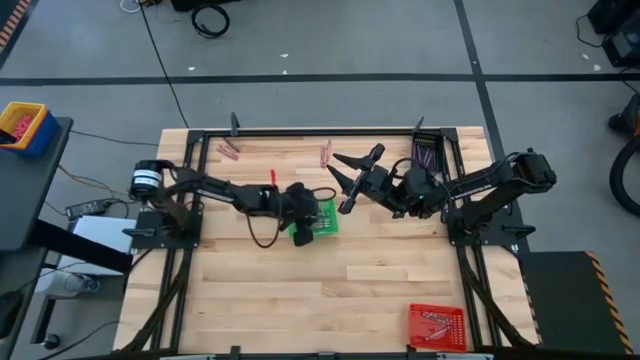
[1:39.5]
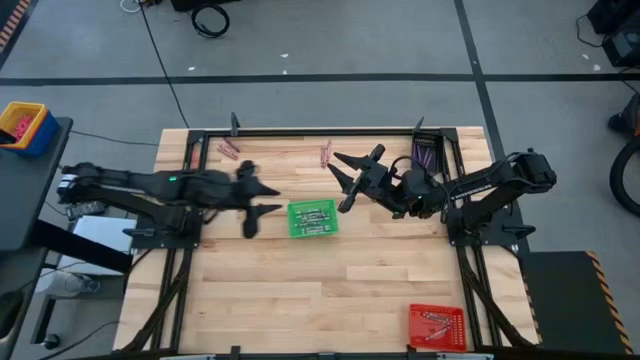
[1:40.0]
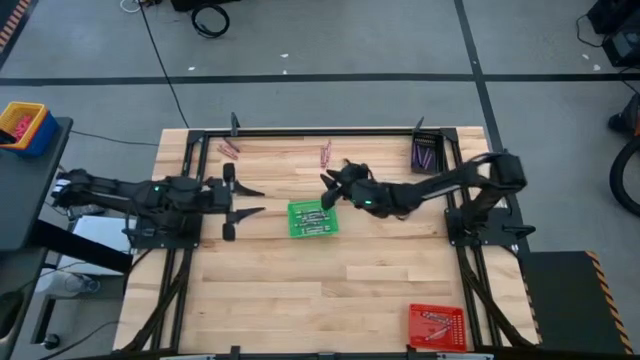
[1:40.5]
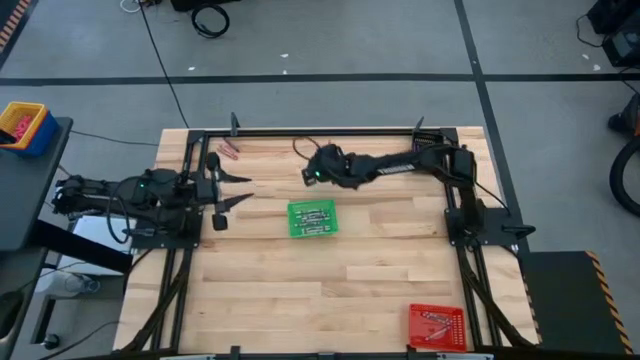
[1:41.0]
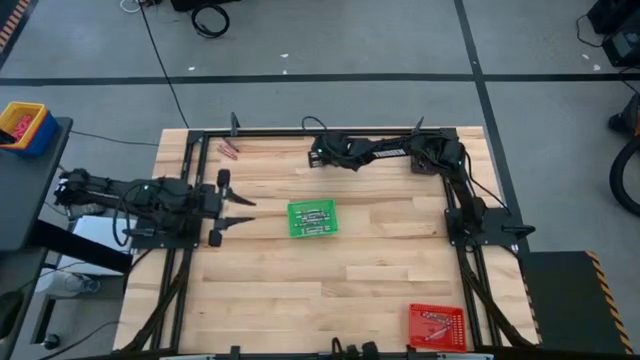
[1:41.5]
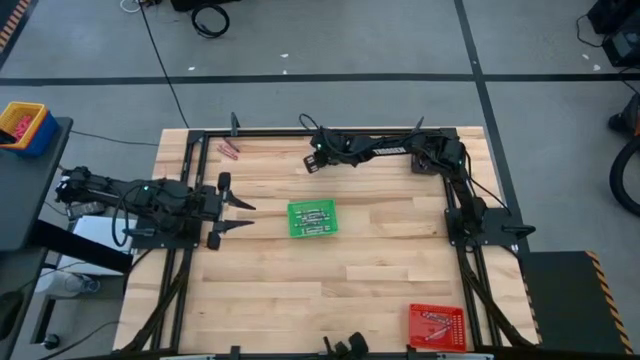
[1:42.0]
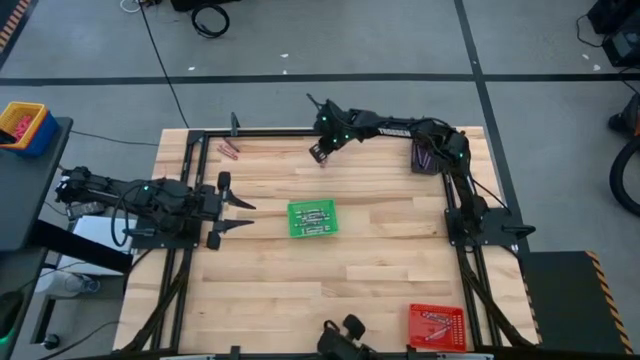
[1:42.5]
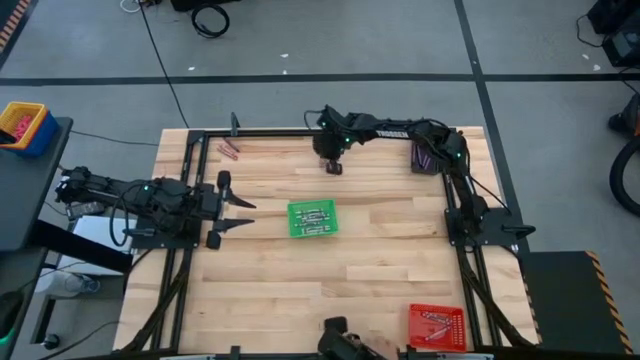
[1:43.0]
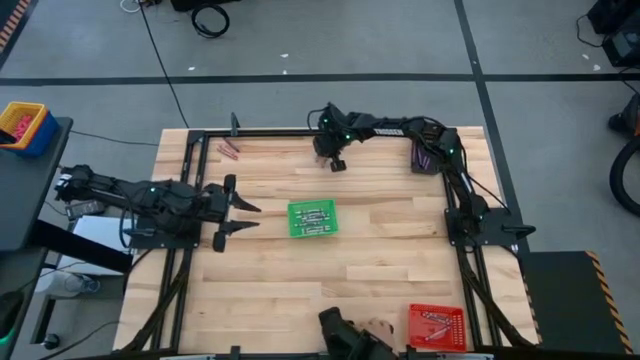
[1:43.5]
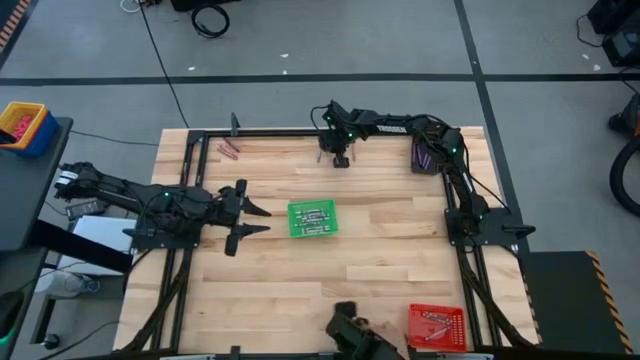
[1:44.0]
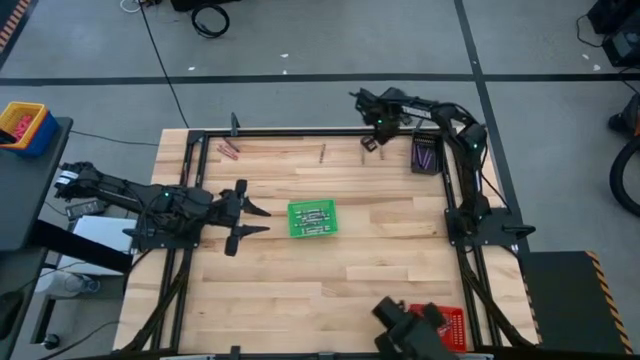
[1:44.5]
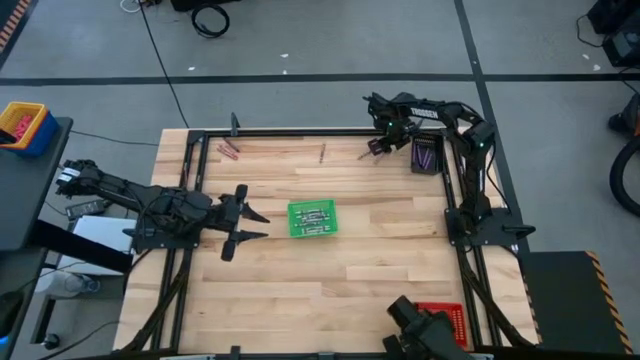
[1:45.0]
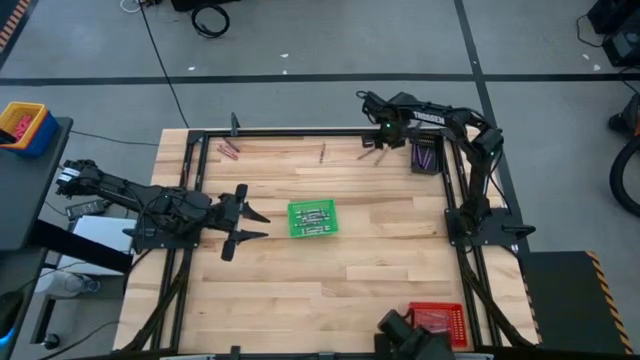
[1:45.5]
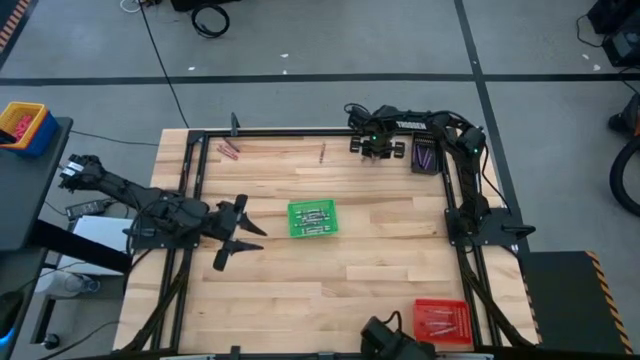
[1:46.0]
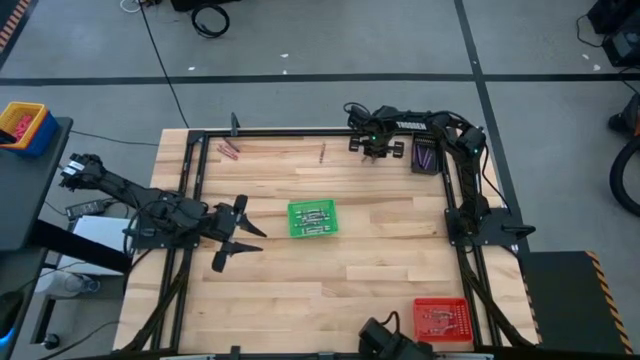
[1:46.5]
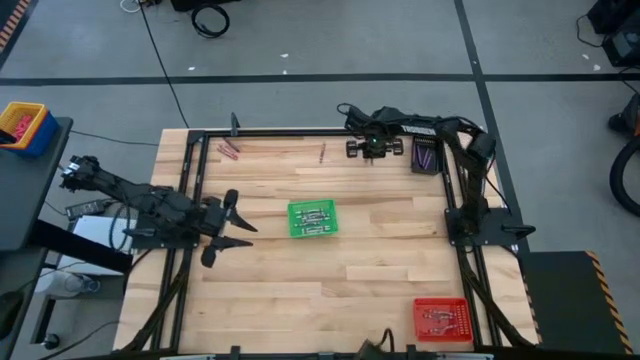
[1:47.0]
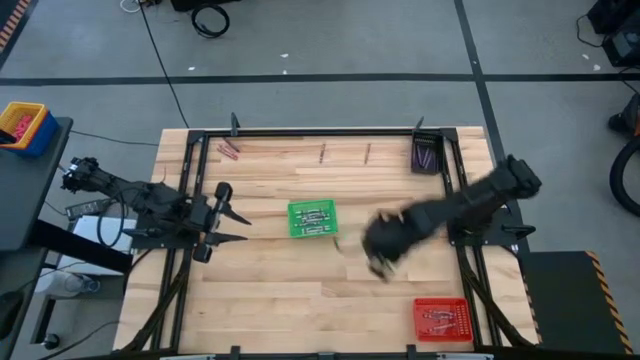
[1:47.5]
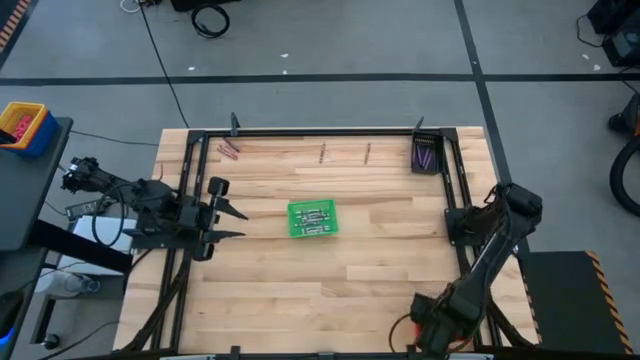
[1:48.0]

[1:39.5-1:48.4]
Task: Sort crayons
Put the pink crayon into the red basket

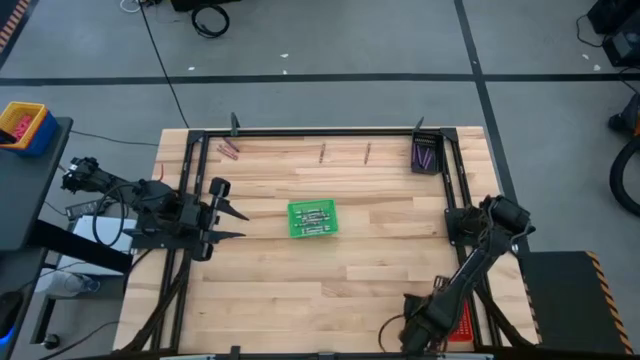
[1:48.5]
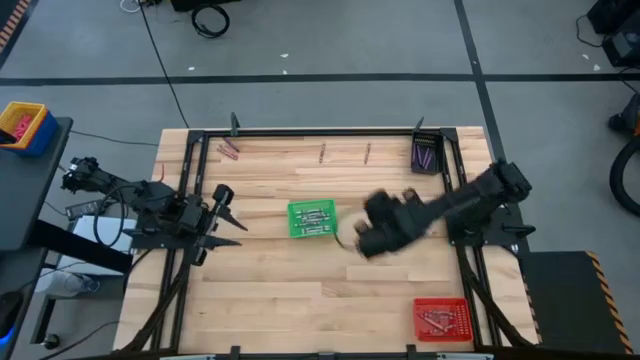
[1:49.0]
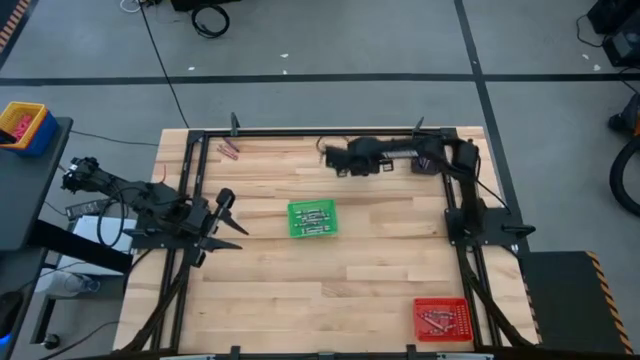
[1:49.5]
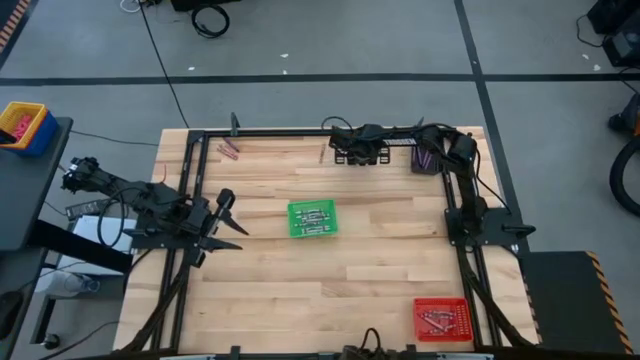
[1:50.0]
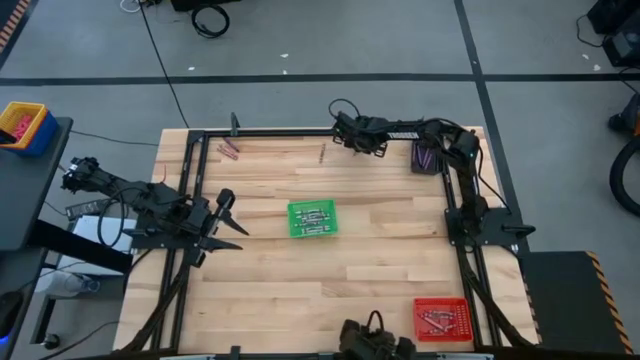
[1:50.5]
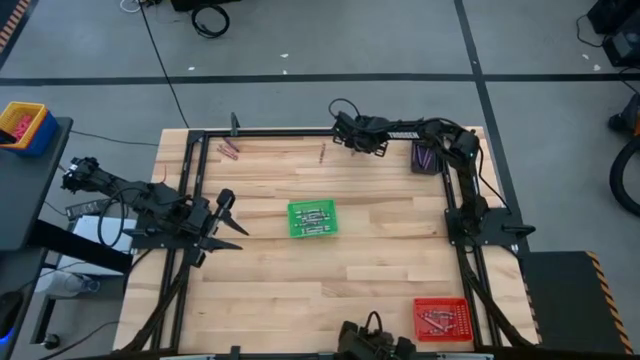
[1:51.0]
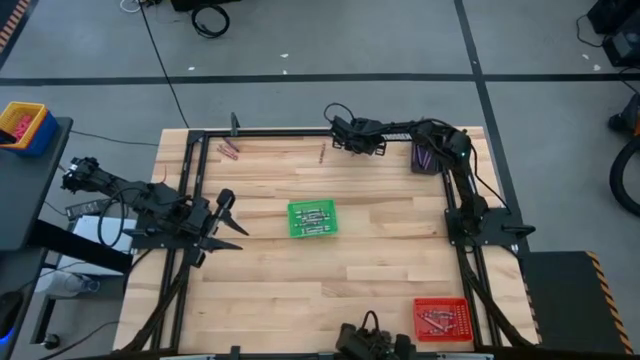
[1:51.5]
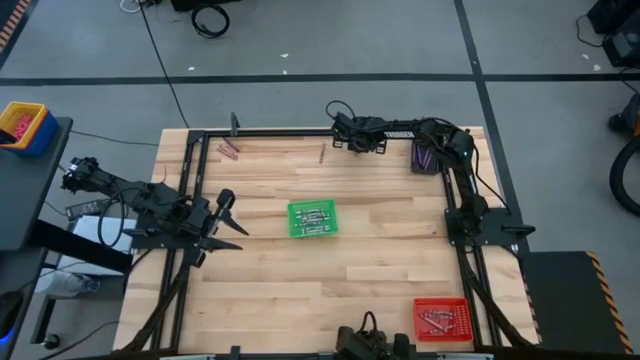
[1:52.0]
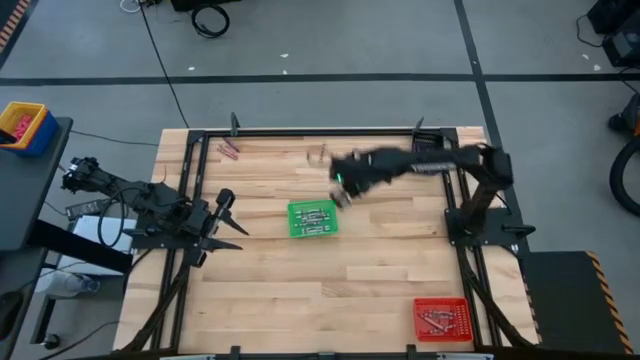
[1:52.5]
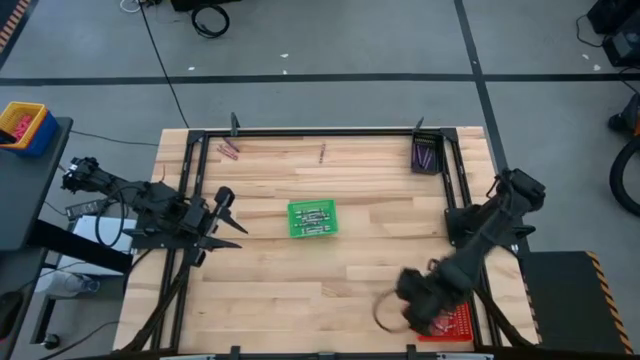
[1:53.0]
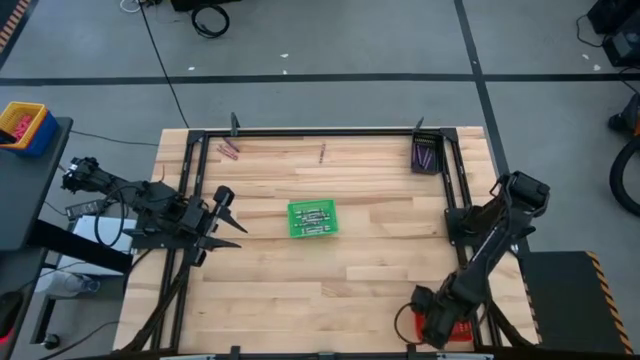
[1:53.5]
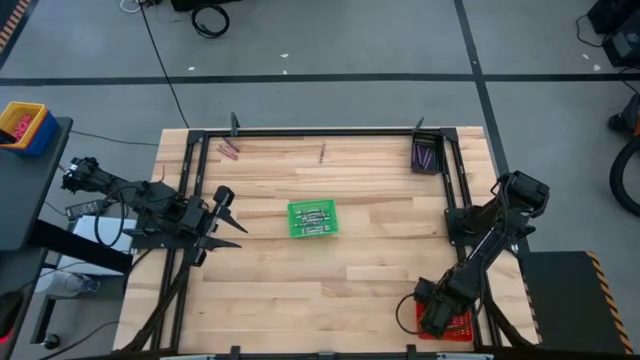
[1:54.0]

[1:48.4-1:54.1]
Put the pink crayon into the red basket

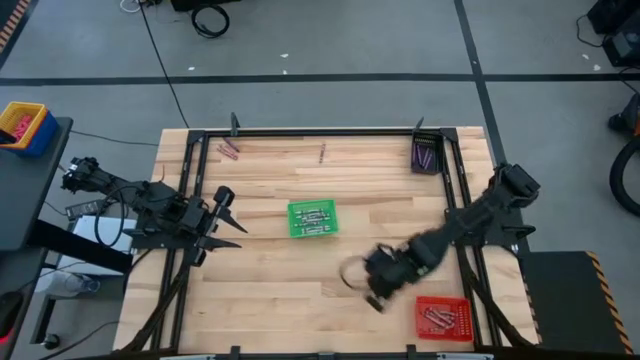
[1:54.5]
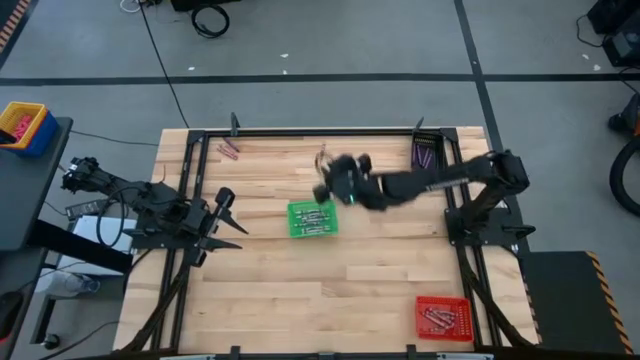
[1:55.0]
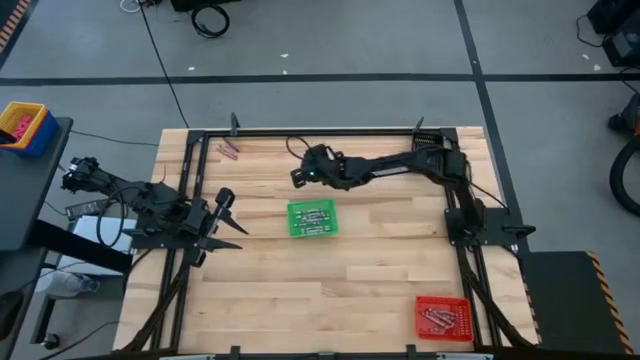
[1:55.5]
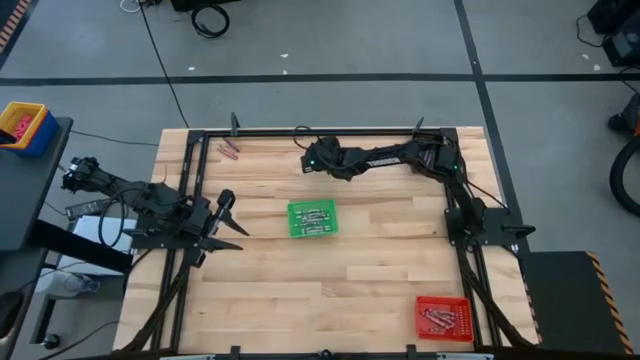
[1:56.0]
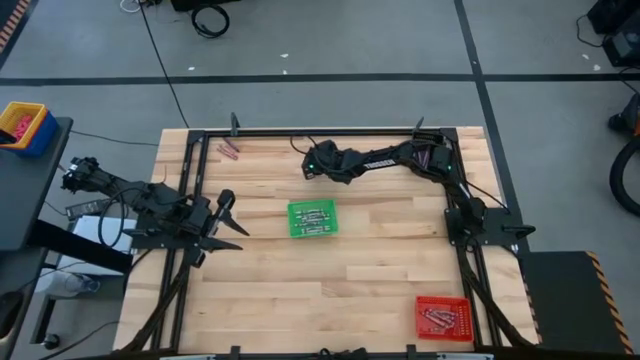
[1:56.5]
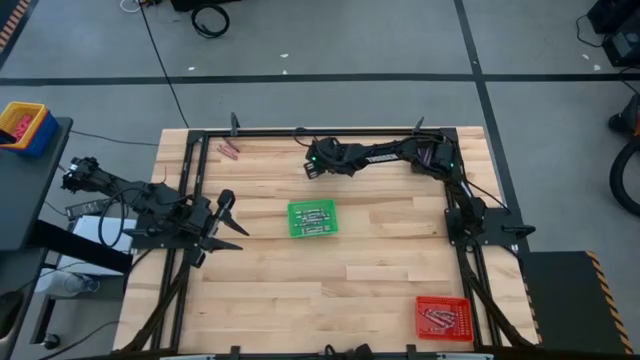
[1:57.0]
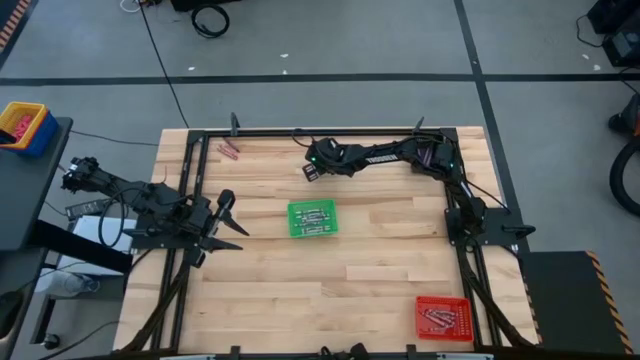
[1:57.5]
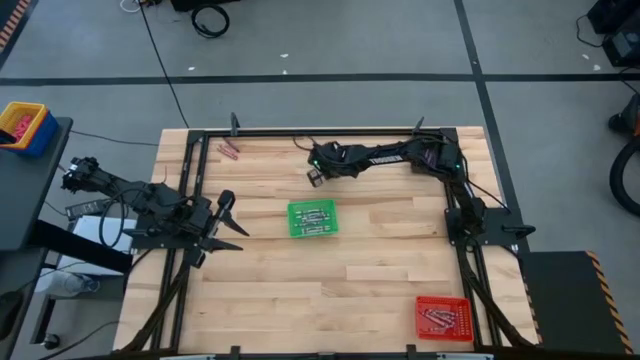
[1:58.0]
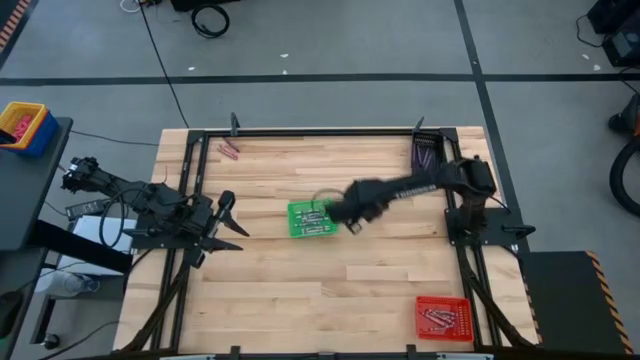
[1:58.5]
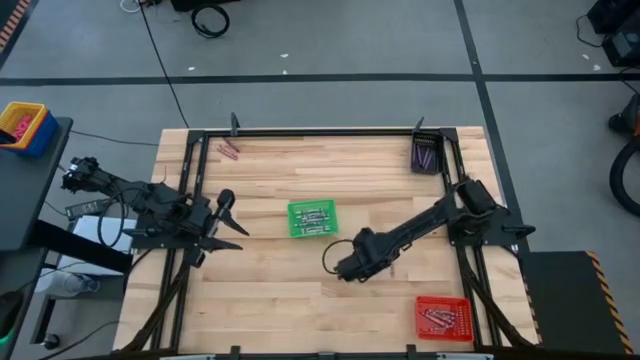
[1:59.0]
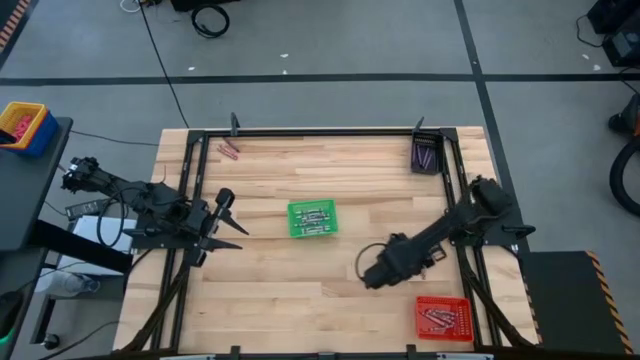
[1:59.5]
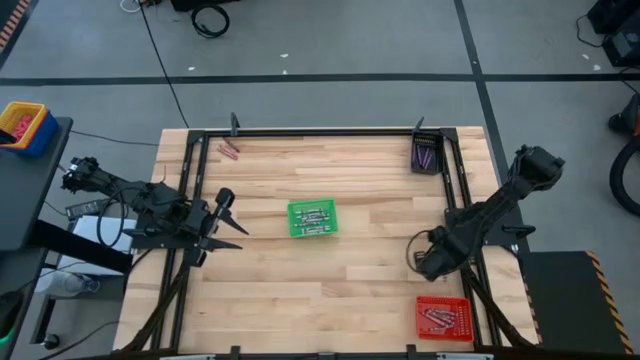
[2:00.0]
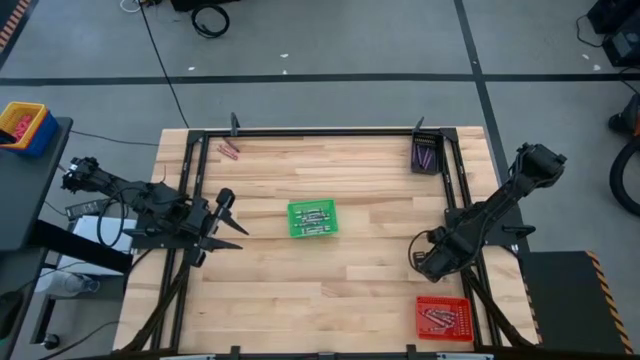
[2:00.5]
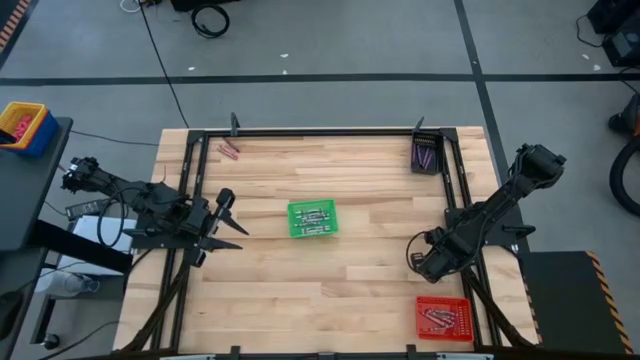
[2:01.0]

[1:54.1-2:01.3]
Put the pink crayon into the red basket
